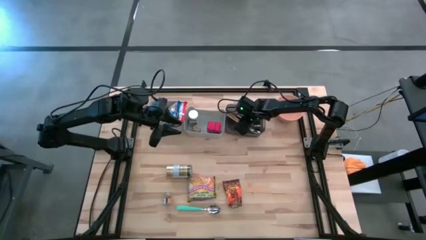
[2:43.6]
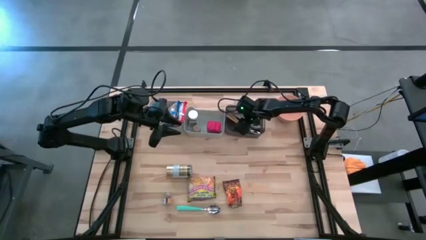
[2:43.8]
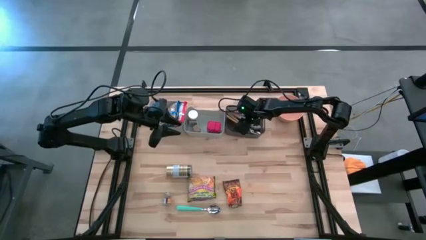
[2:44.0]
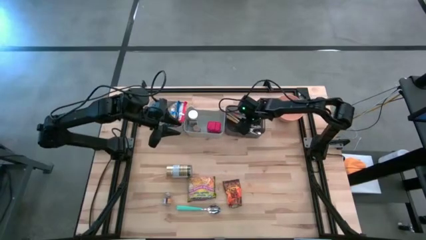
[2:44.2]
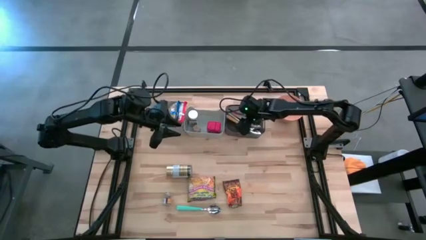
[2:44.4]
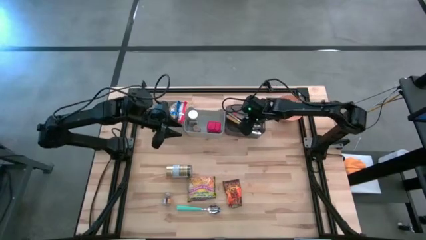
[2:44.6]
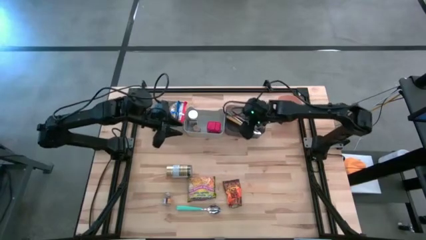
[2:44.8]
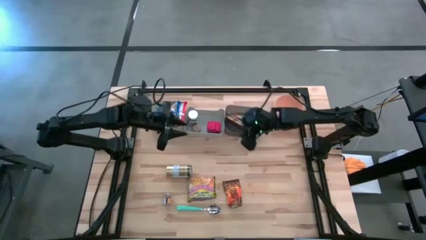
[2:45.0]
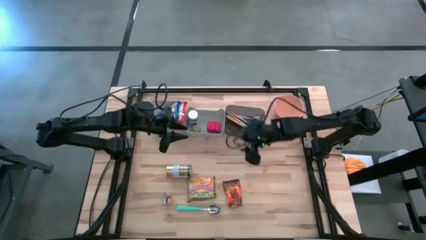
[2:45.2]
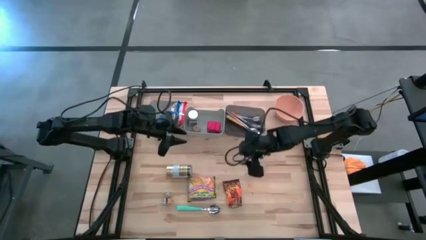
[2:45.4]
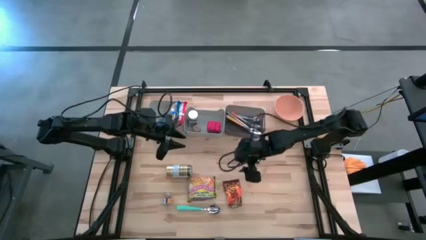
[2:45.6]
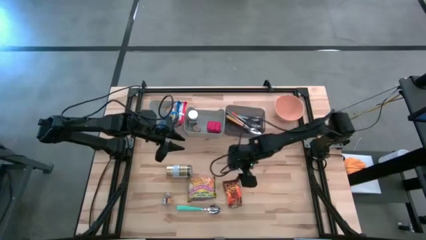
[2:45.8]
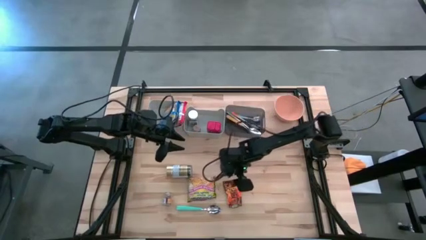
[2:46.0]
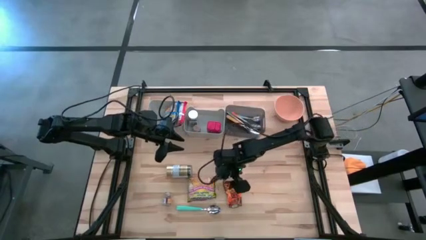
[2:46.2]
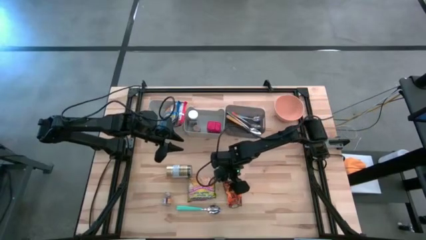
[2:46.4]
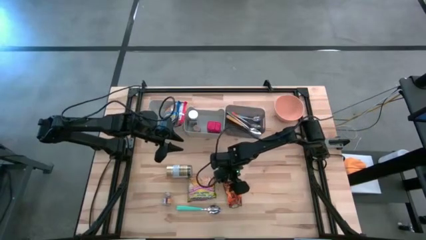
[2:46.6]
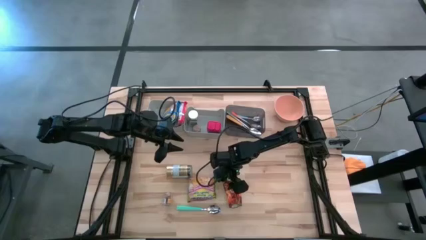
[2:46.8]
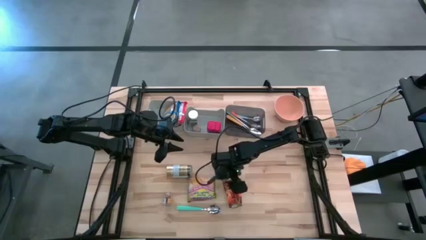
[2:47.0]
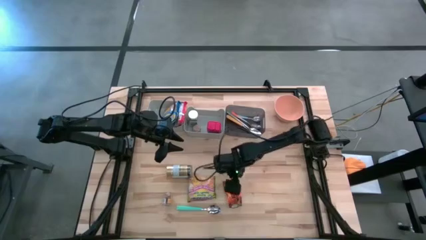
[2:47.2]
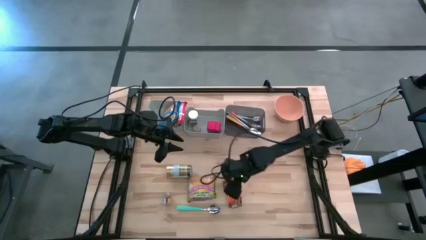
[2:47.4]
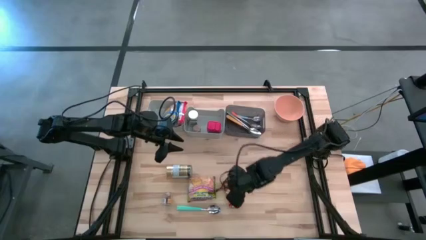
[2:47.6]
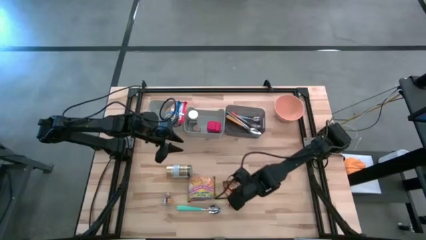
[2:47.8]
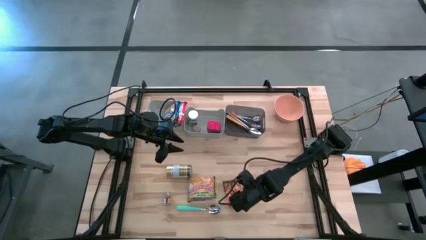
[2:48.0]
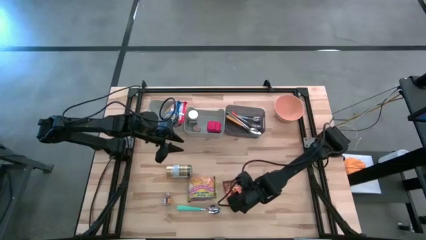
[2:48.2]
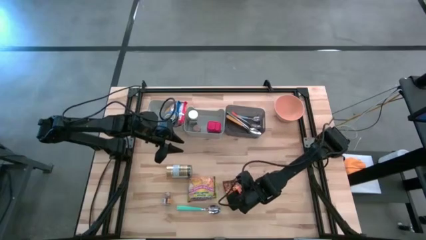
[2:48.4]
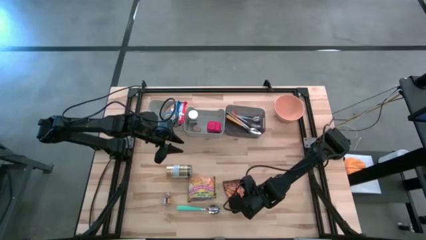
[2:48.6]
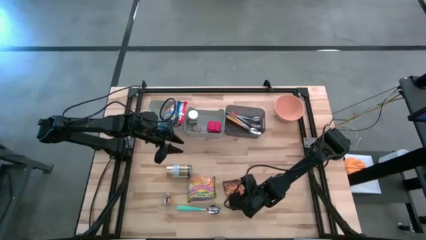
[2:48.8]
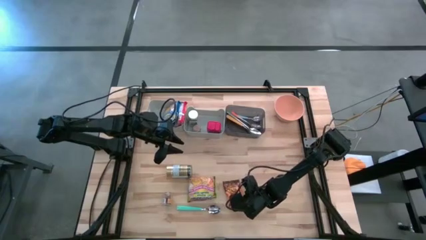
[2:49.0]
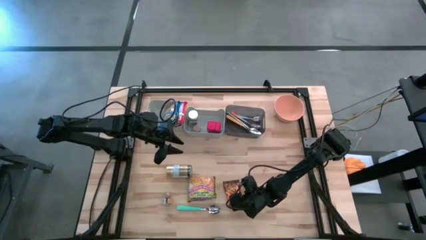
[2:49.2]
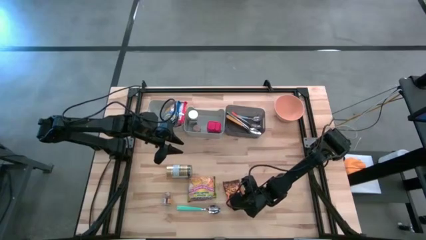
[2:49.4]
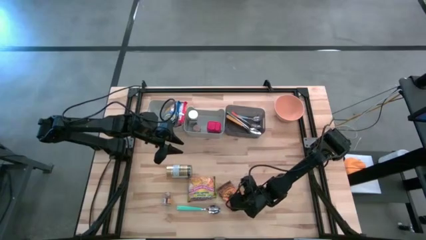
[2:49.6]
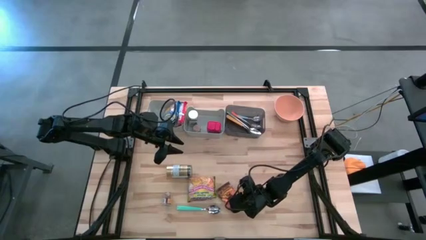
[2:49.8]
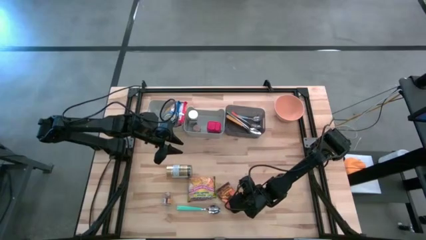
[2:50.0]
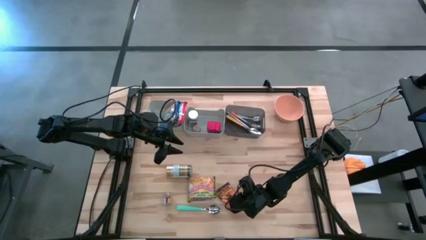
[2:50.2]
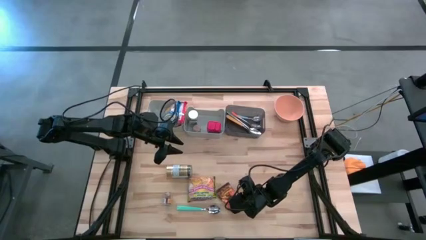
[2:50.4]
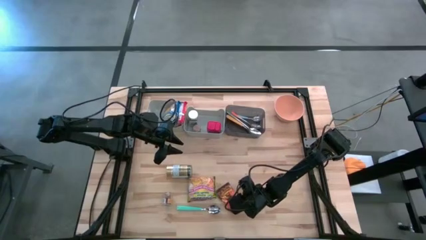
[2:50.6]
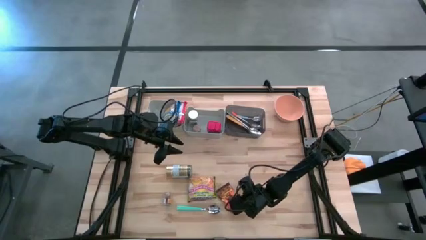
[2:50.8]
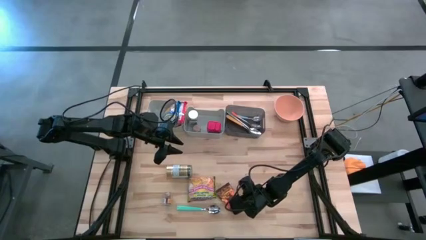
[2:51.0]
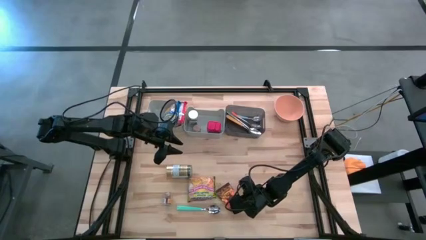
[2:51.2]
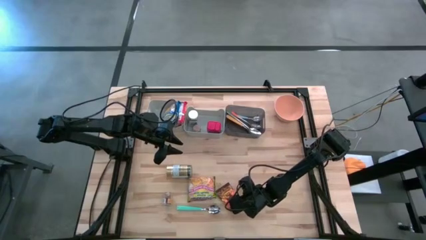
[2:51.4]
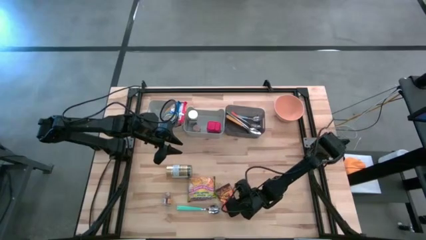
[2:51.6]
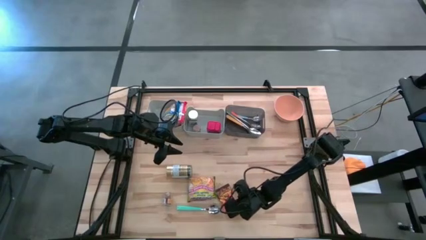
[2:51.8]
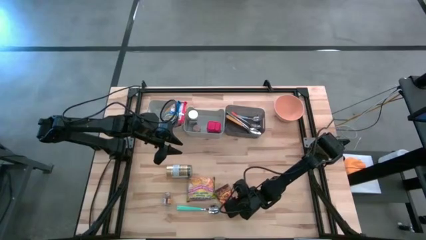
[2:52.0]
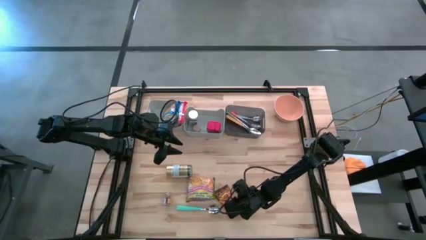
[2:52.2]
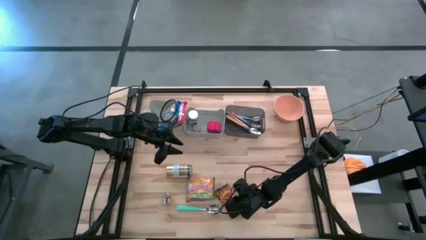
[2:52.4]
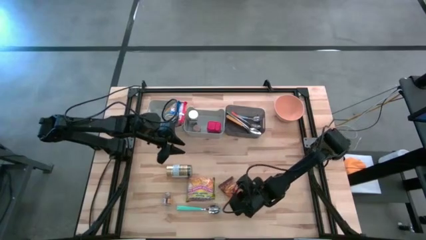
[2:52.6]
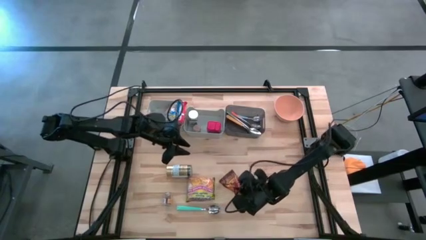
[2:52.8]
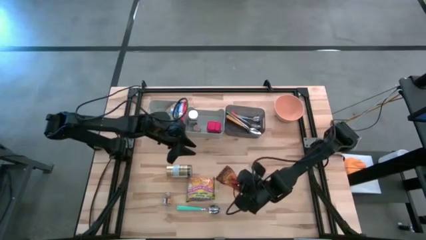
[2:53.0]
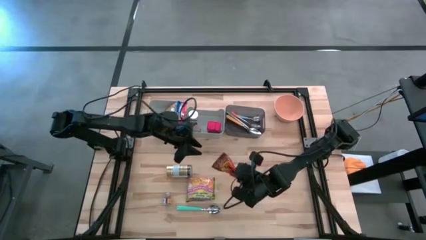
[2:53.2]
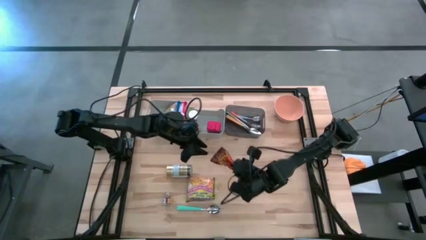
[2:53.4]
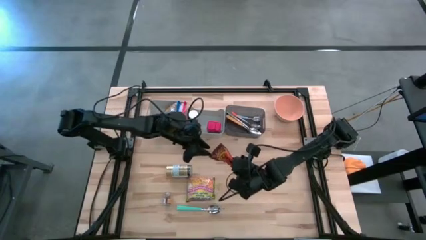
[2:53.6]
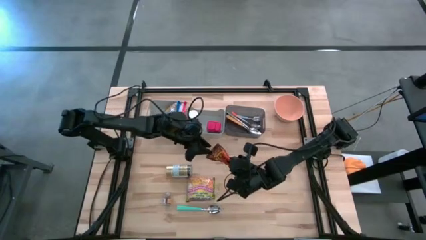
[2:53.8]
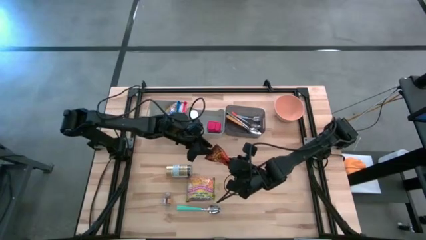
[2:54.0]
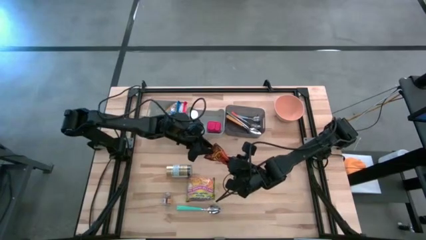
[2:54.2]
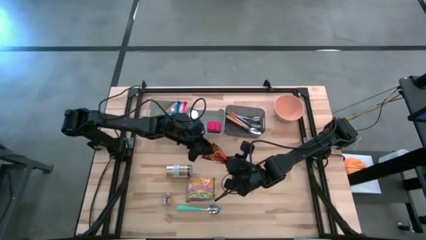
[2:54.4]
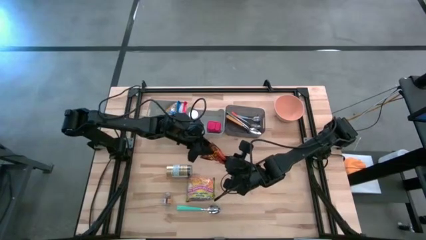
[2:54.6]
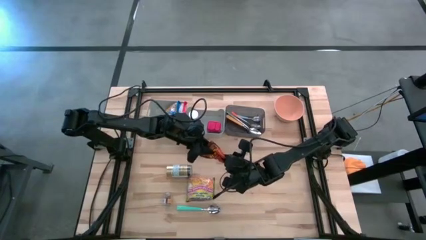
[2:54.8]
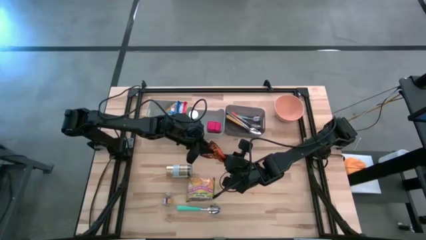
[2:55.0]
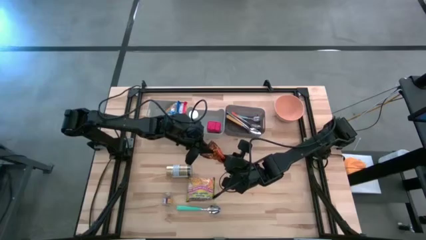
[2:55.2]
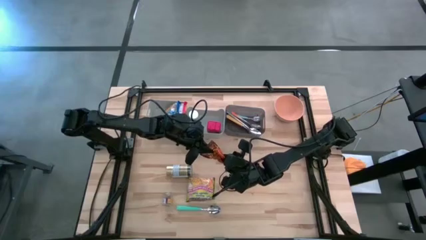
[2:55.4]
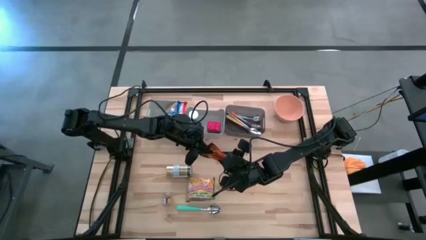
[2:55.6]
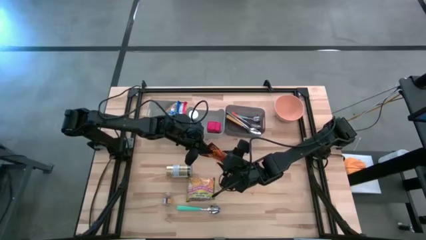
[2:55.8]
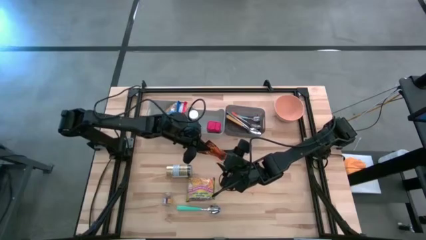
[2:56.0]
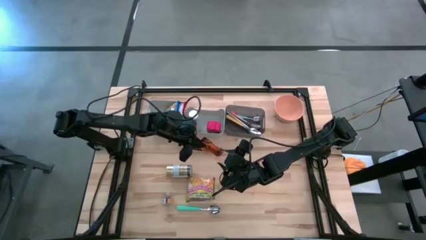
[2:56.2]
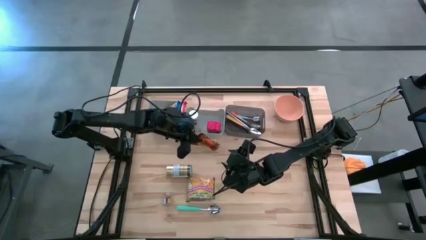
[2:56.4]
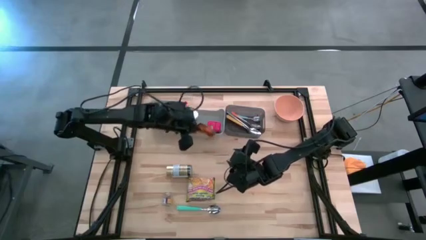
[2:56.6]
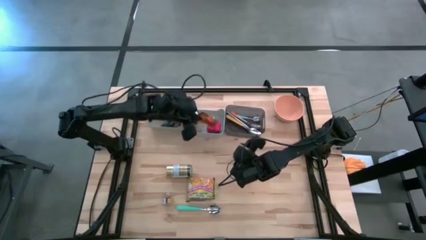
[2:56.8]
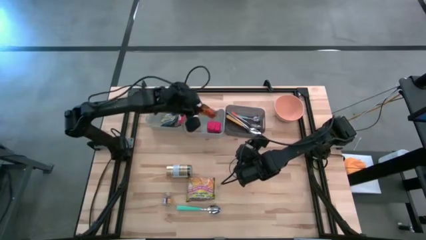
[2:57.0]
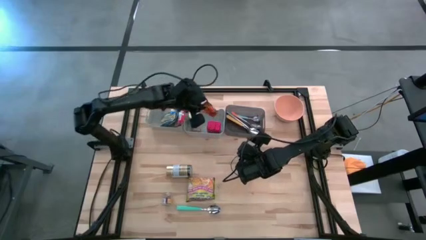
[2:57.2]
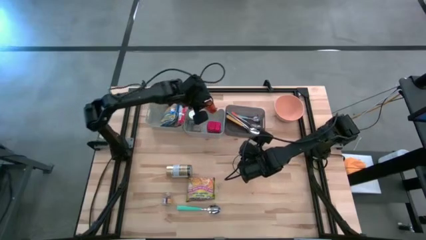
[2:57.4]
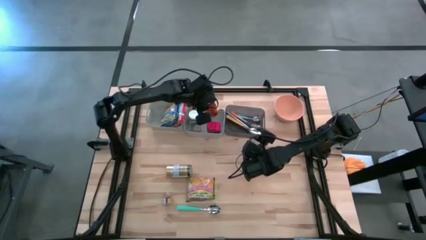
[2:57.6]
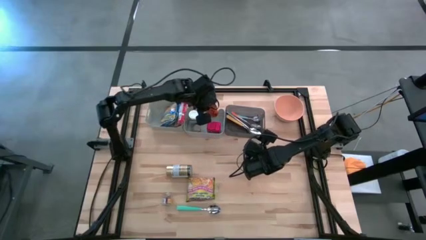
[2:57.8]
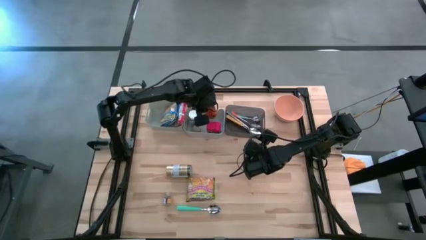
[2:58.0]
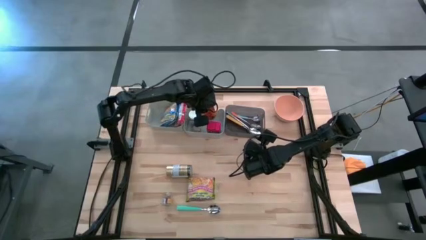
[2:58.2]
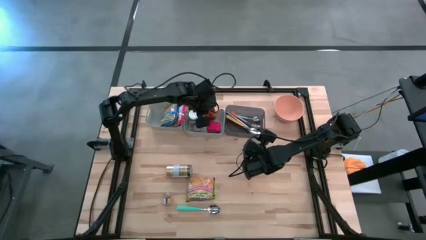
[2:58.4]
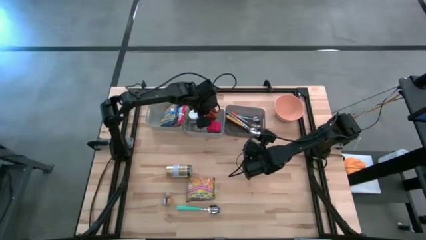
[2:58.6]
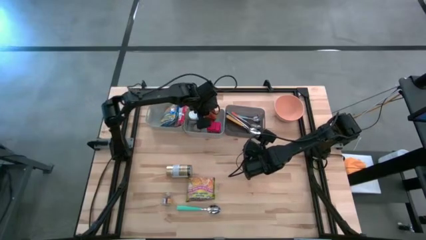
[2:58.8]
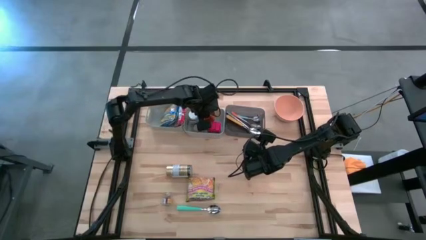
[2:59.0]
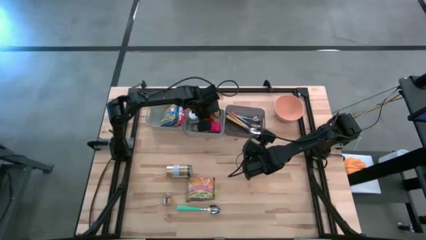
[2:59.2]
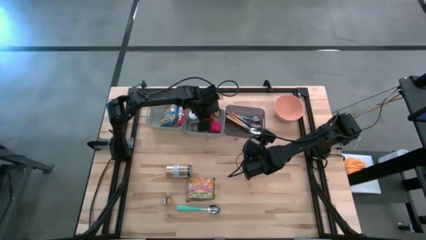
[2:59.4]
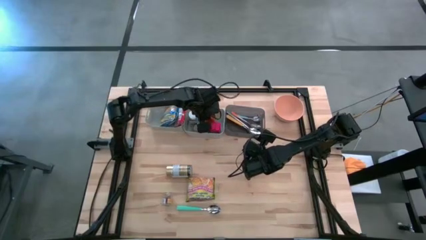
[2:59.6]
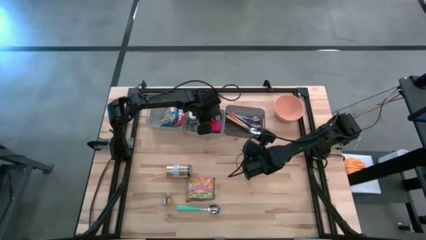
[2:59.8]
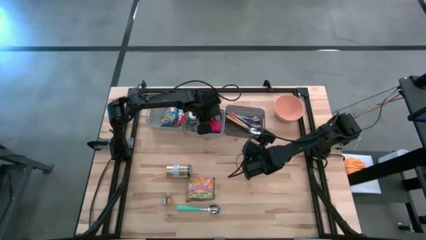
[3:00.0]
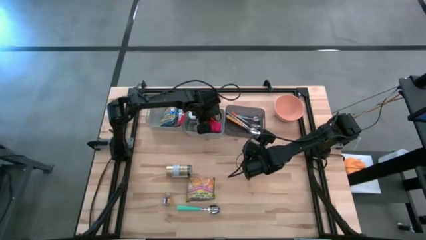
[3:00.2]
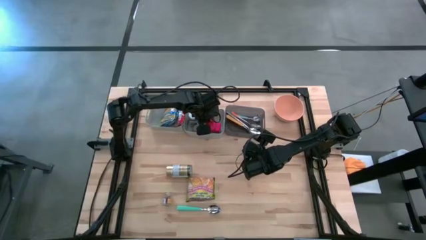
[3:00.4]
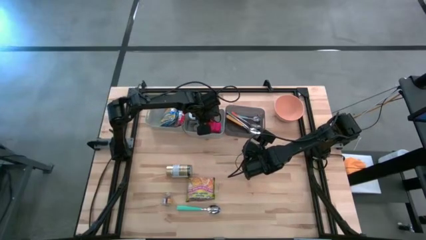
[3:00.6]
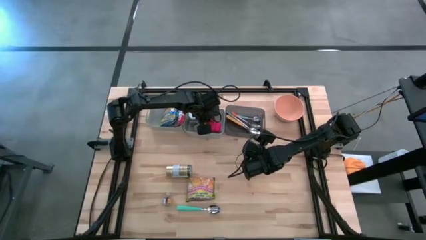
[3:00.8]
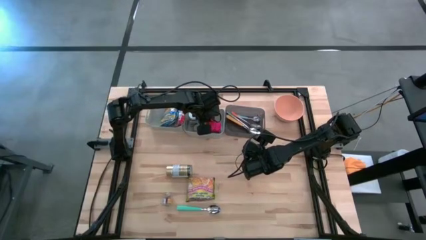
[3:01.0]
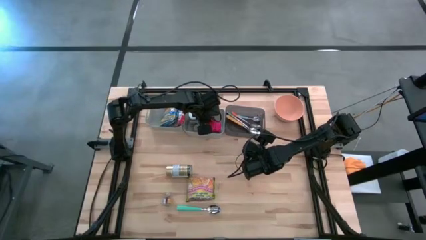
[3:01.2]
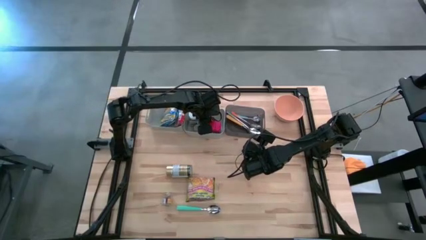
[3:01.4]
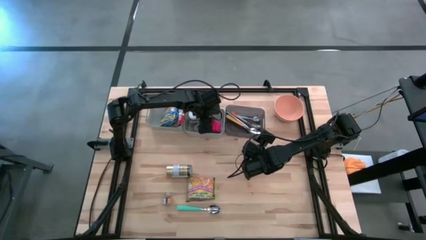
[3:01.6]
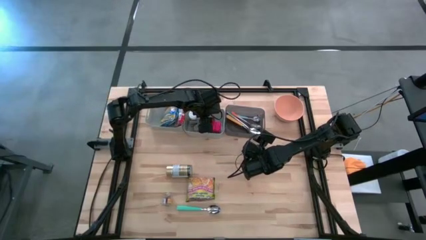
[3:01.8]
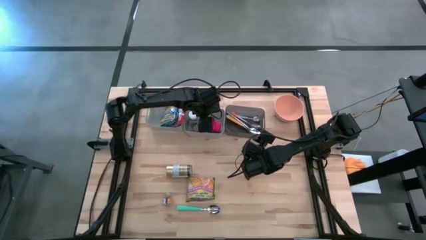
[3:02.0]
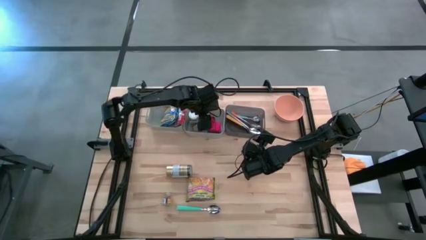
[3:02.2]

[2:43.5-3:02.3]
Put the orange seasoning pack into the right gray bin
